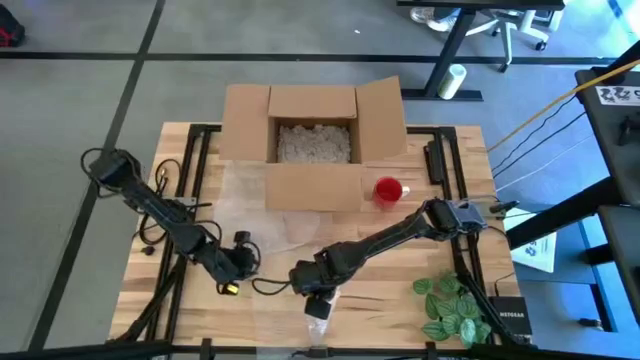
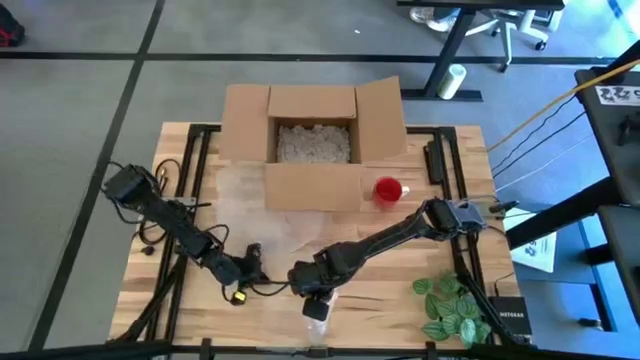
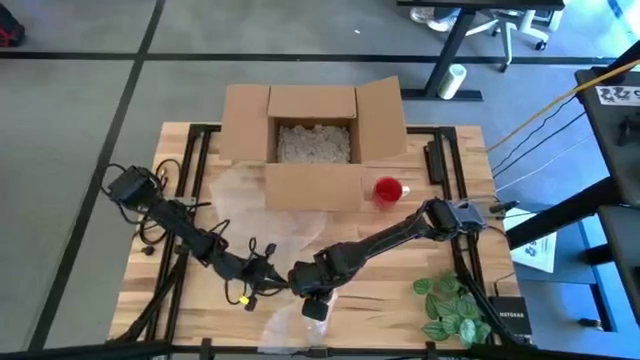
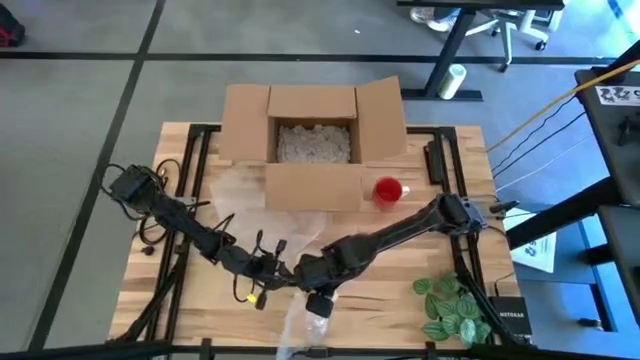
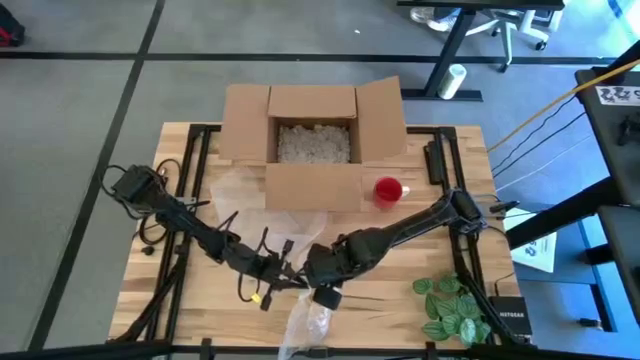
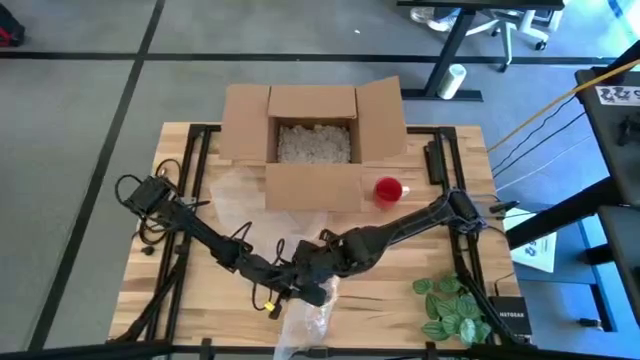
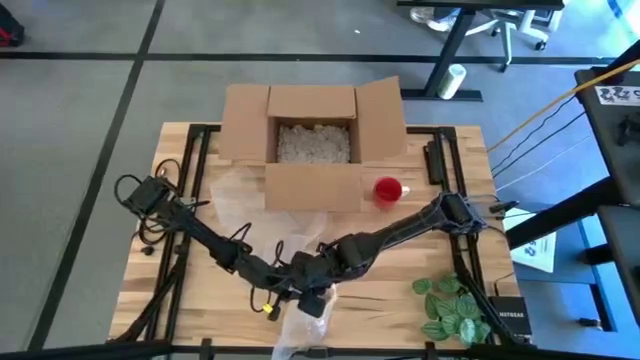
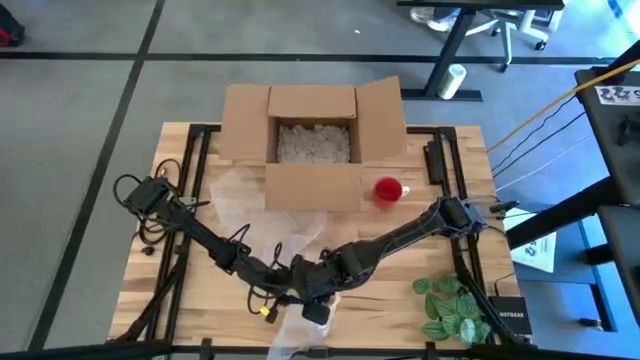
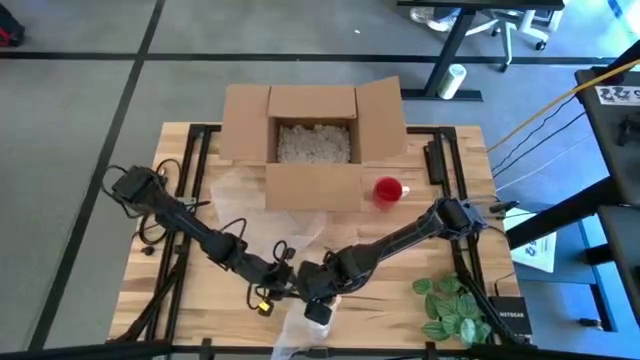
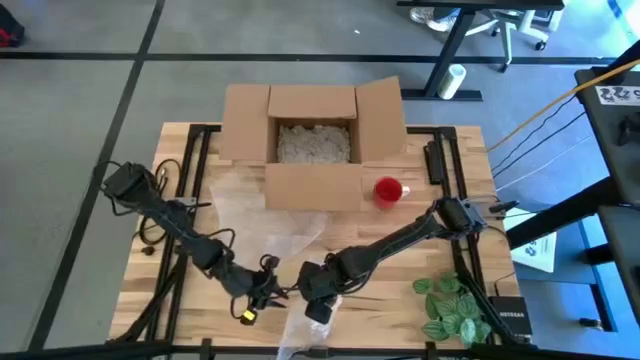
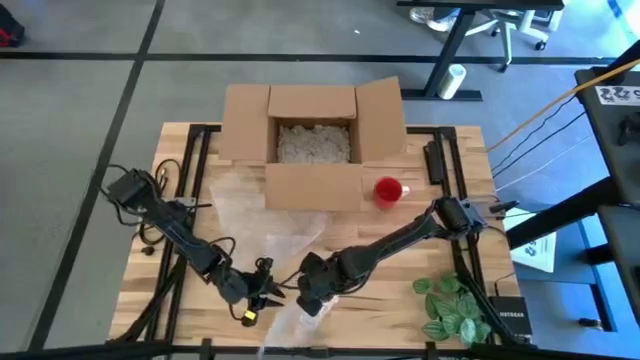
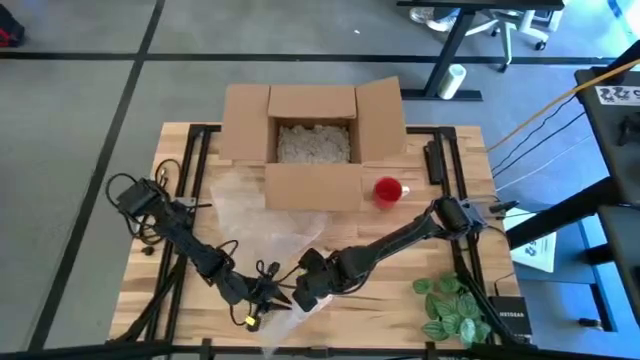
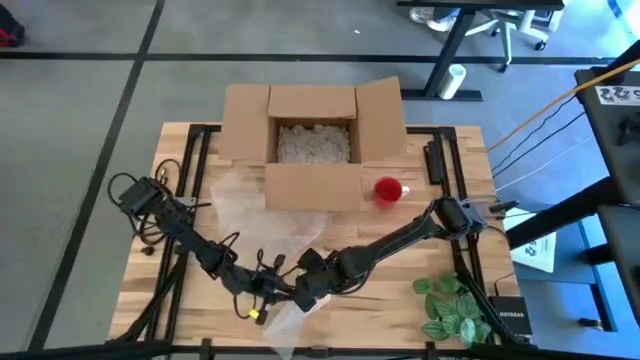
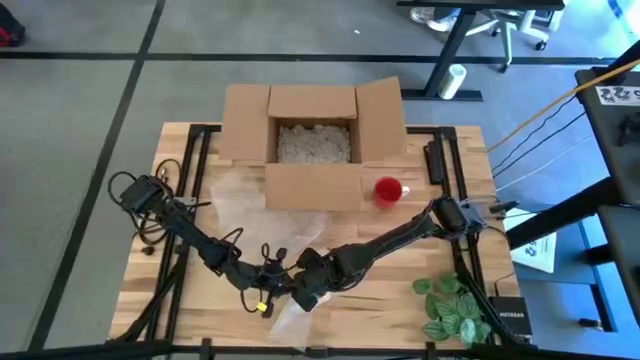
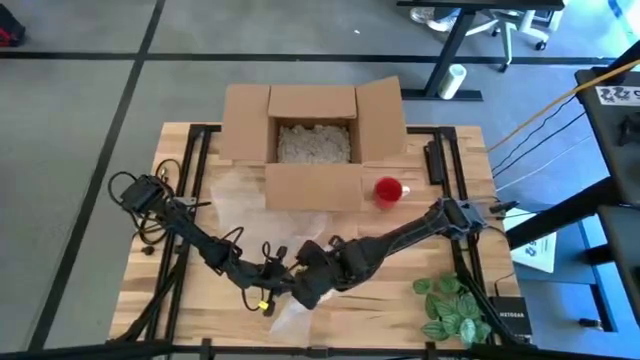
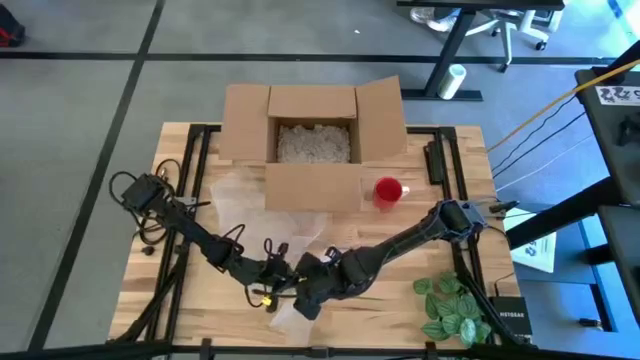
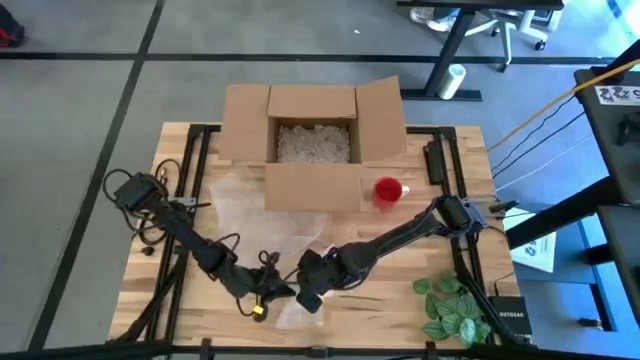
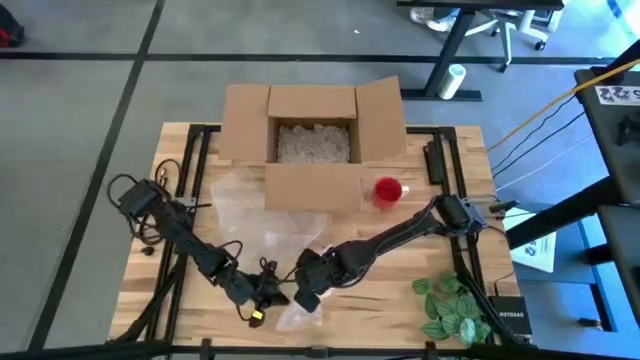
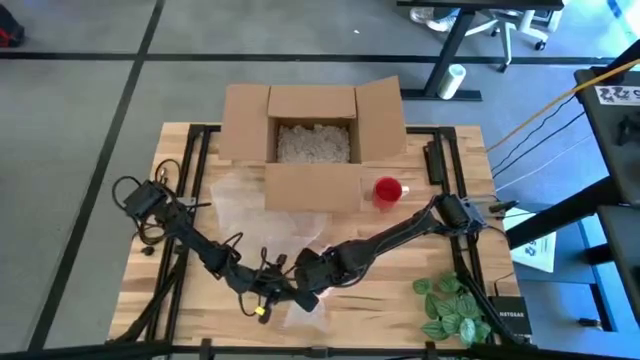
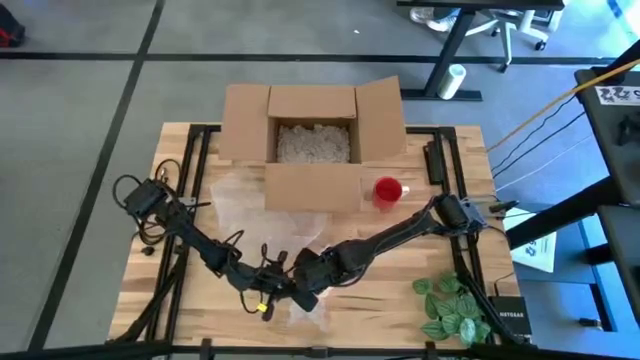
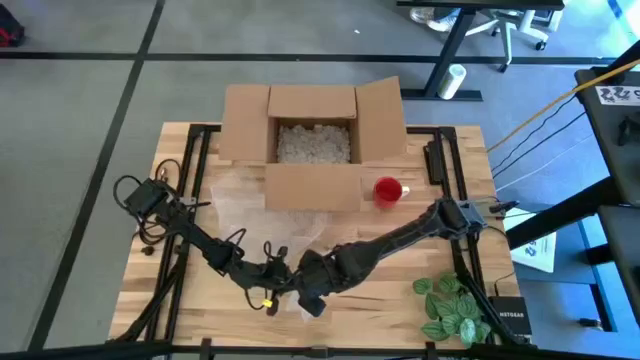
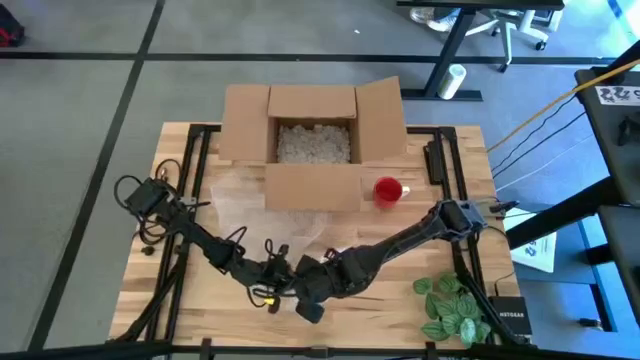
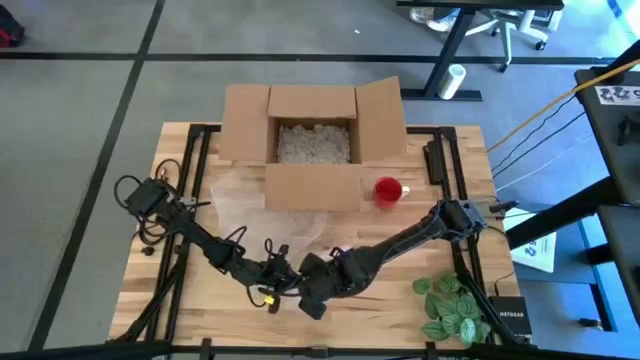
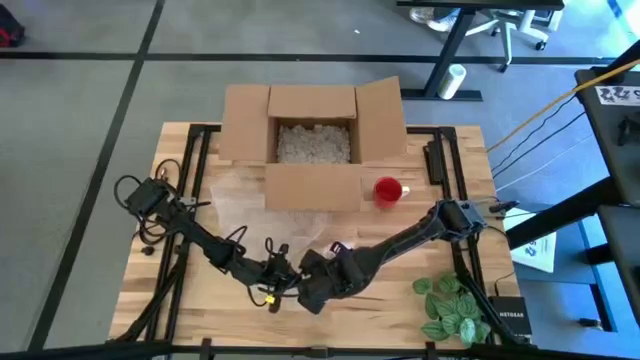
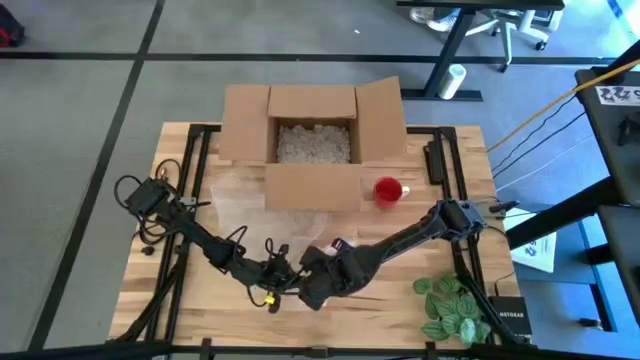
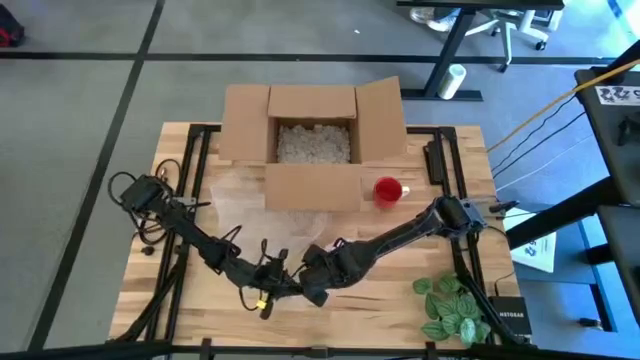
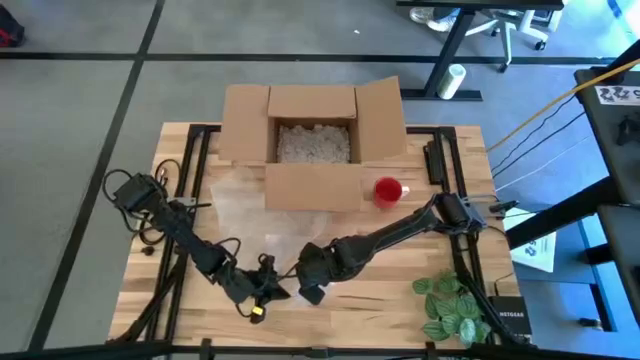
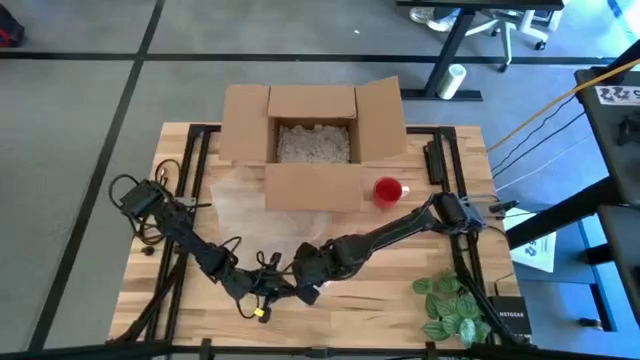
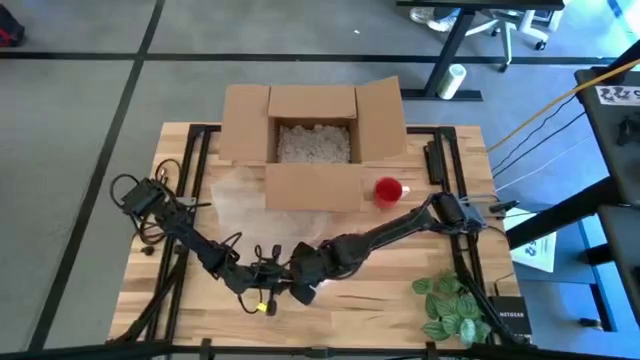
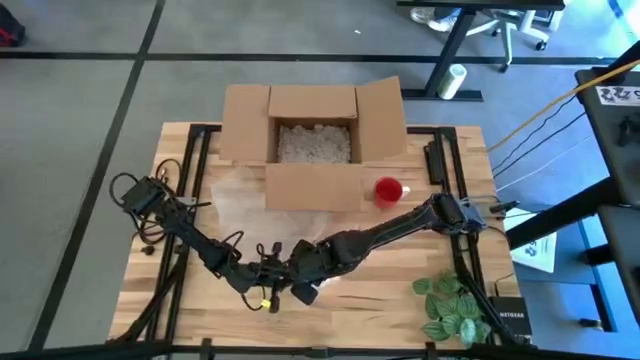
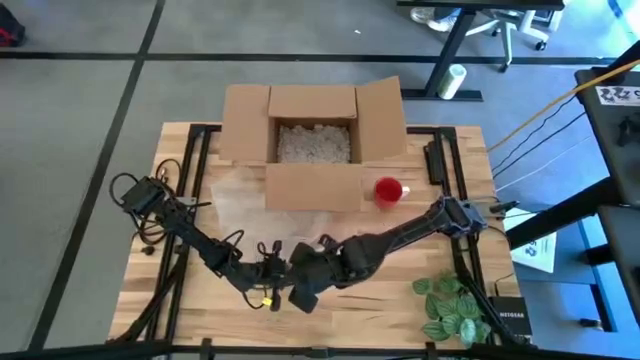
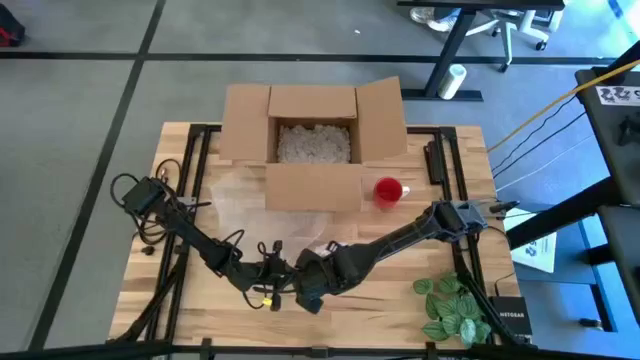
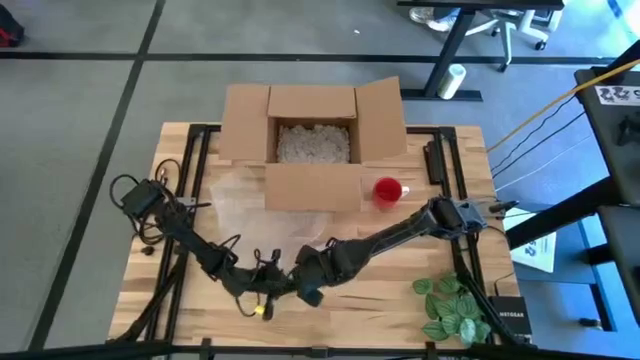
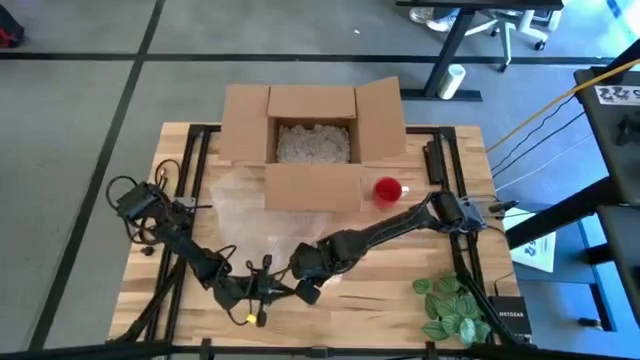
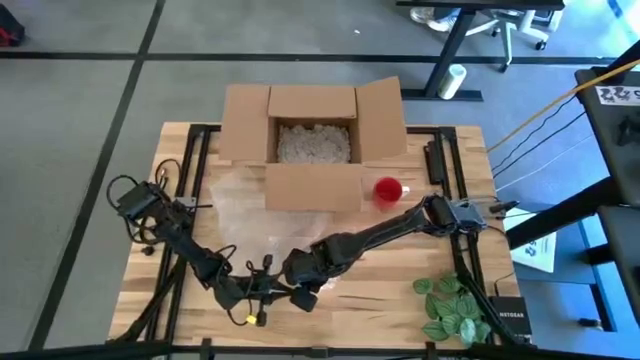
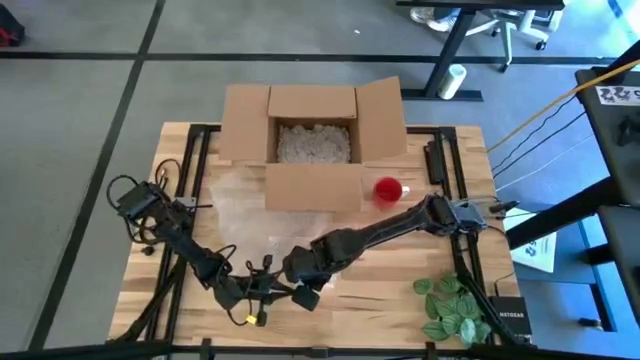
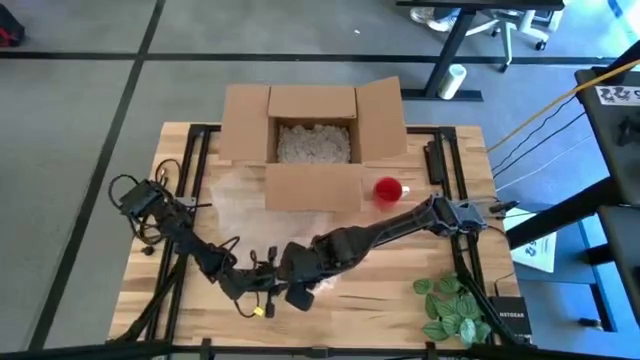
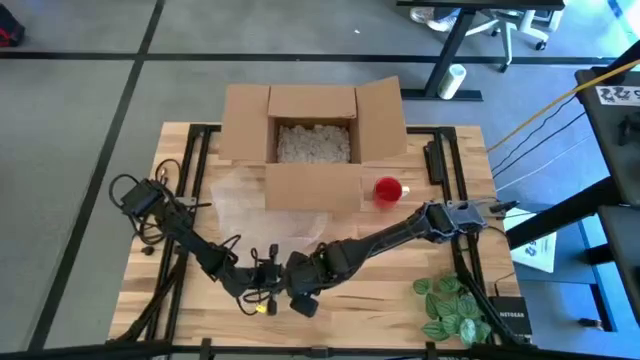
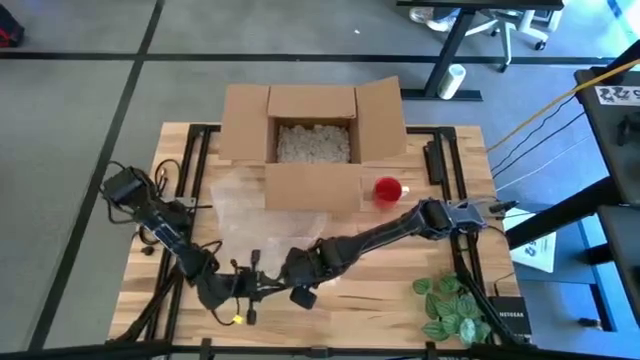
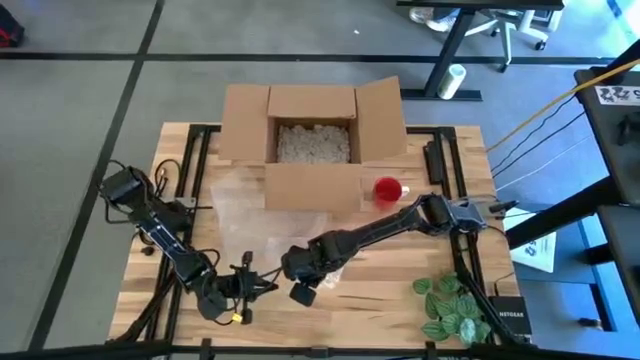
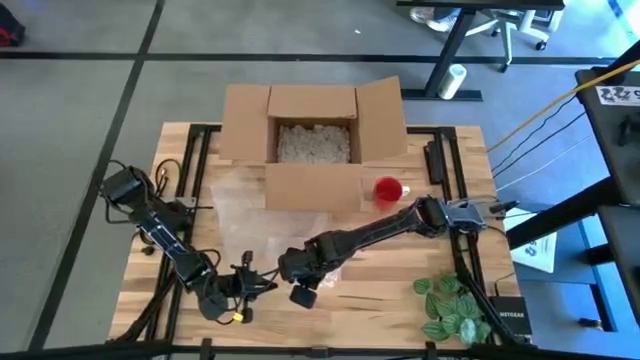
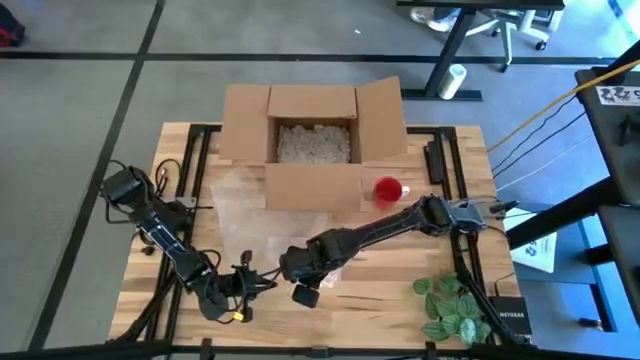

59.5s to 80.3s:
Task: wrap mug
Wrap the yellow mug using the bubble wrap
